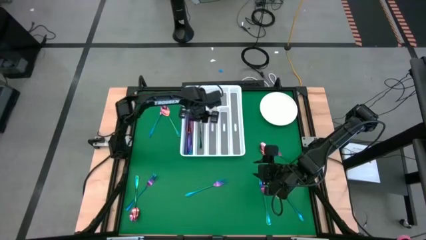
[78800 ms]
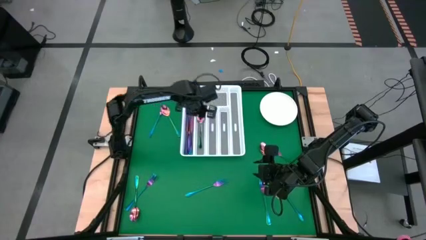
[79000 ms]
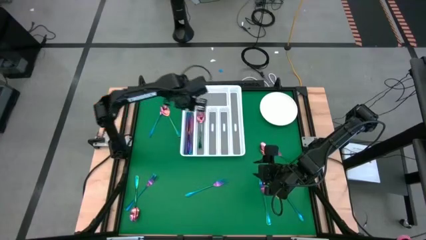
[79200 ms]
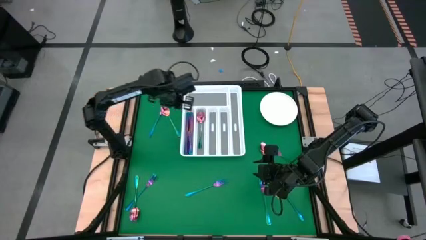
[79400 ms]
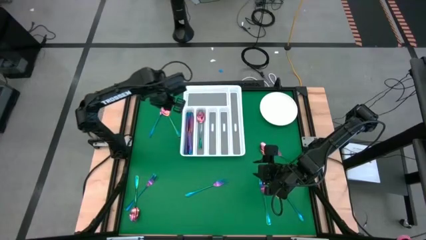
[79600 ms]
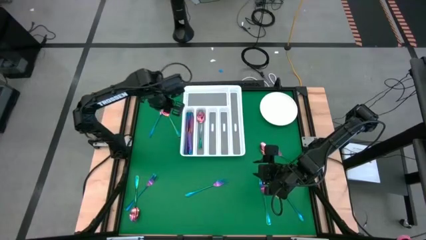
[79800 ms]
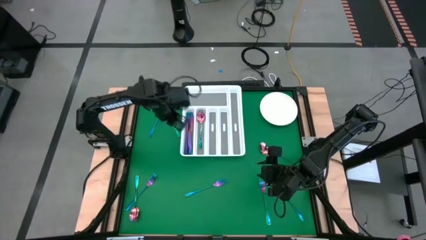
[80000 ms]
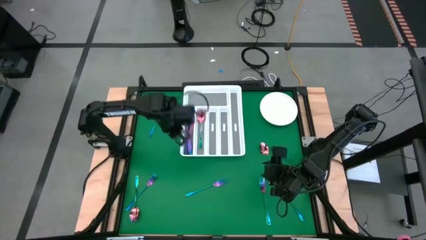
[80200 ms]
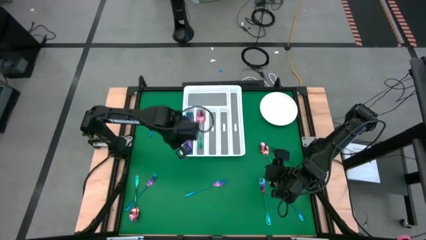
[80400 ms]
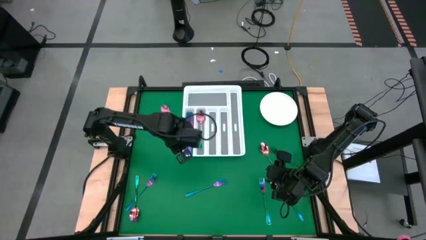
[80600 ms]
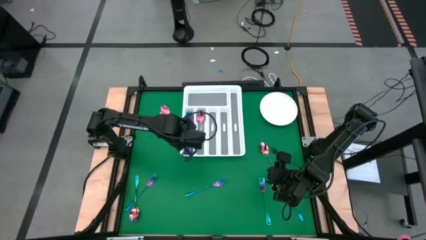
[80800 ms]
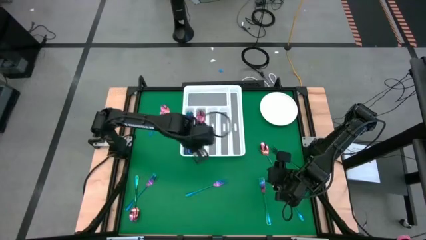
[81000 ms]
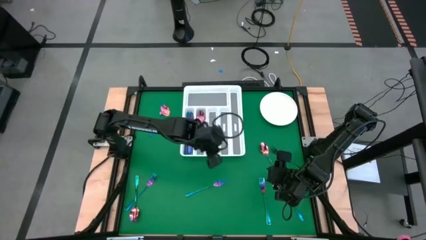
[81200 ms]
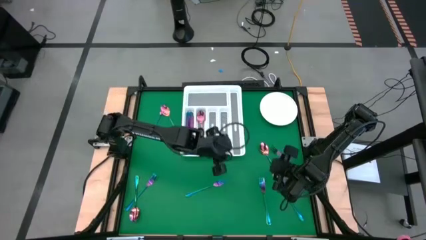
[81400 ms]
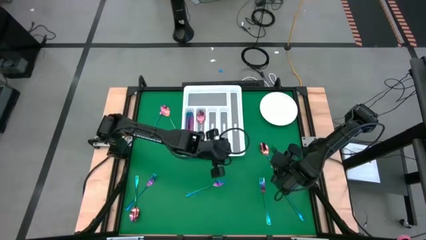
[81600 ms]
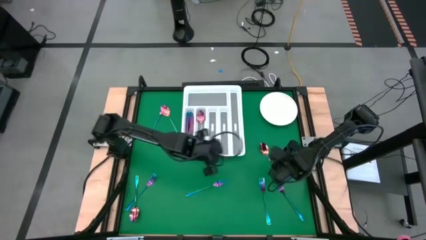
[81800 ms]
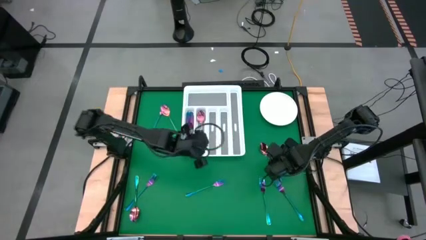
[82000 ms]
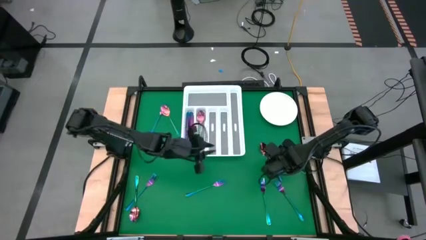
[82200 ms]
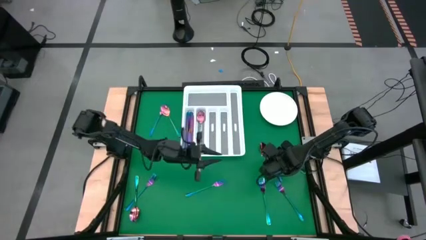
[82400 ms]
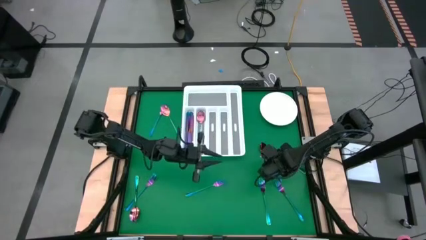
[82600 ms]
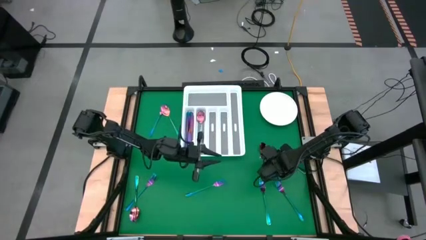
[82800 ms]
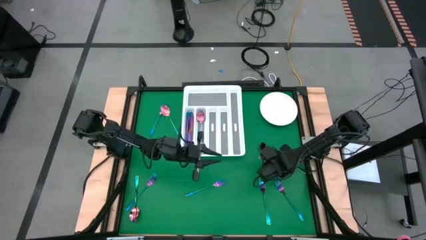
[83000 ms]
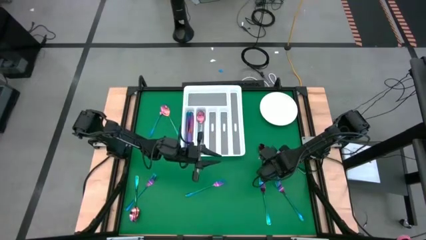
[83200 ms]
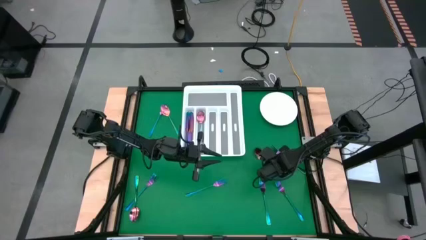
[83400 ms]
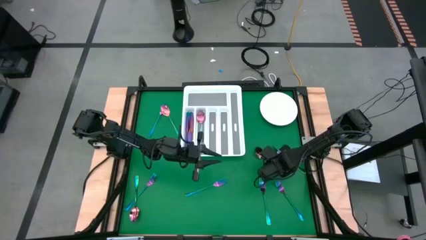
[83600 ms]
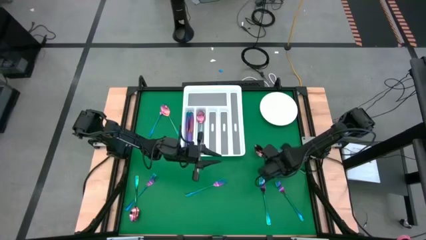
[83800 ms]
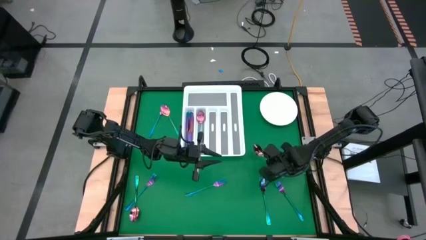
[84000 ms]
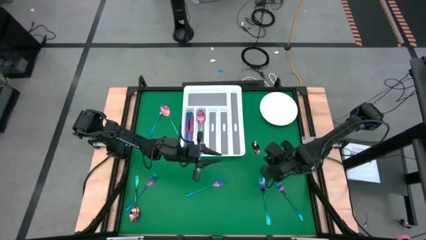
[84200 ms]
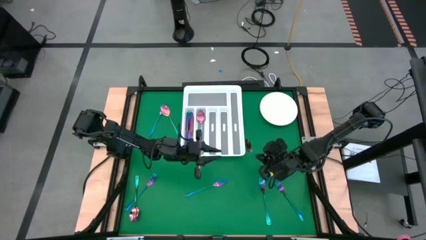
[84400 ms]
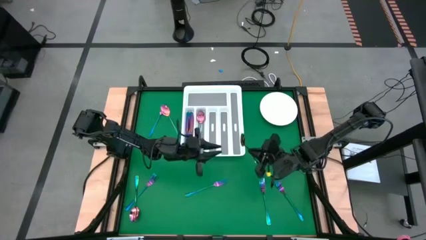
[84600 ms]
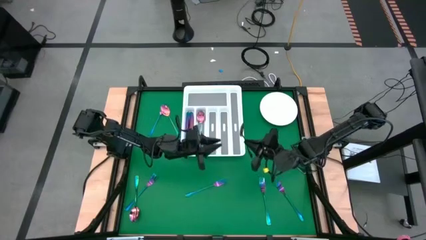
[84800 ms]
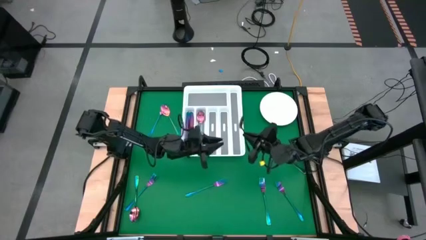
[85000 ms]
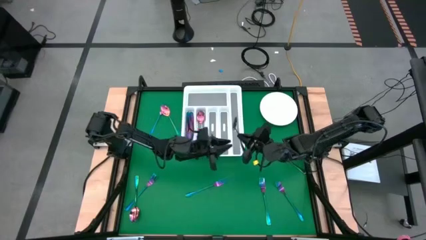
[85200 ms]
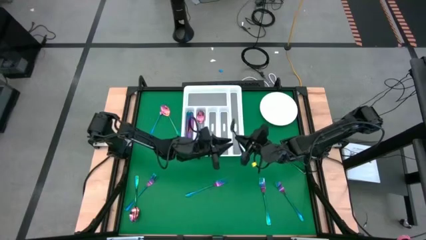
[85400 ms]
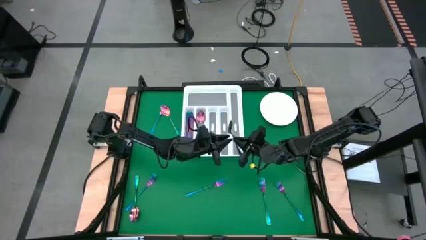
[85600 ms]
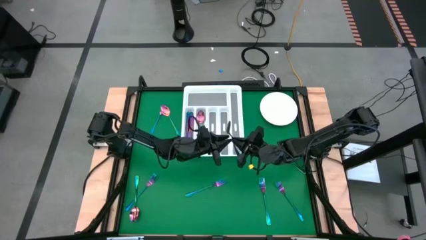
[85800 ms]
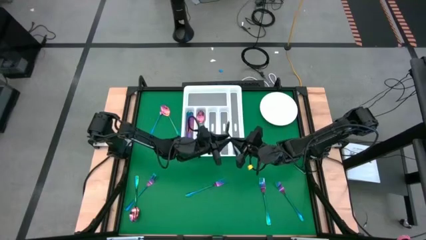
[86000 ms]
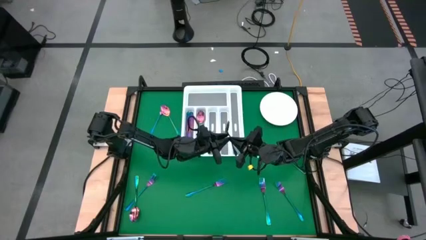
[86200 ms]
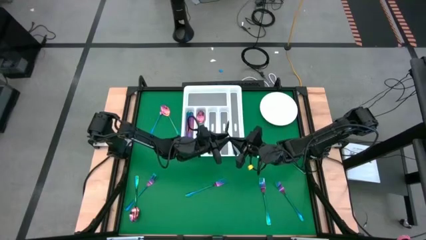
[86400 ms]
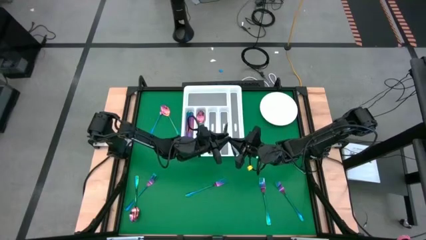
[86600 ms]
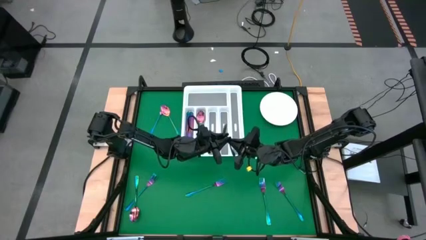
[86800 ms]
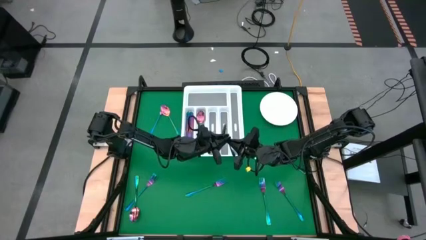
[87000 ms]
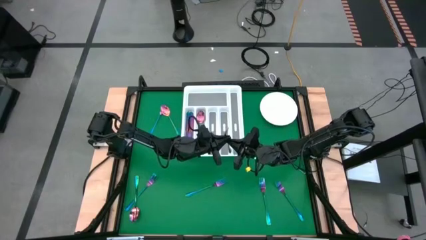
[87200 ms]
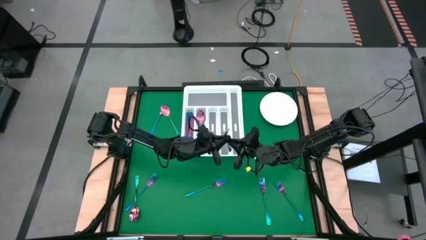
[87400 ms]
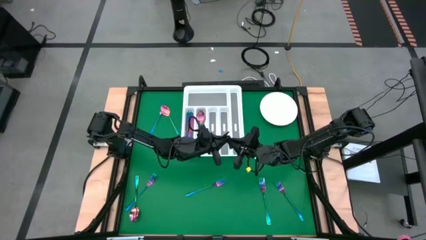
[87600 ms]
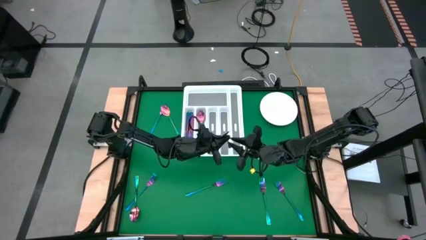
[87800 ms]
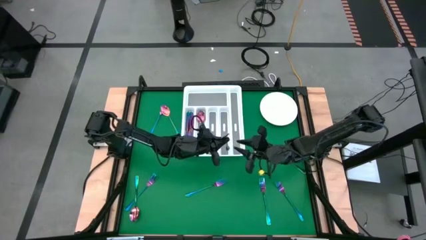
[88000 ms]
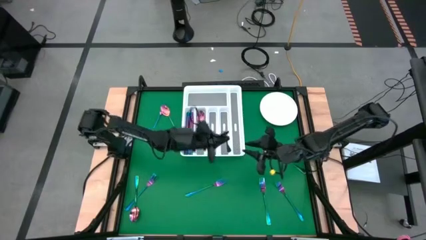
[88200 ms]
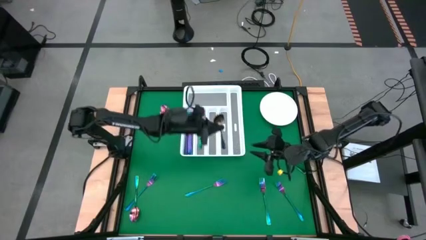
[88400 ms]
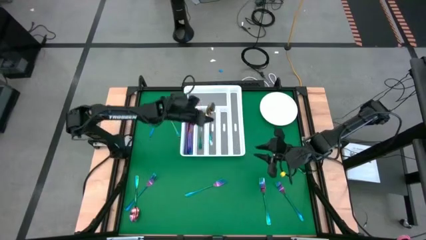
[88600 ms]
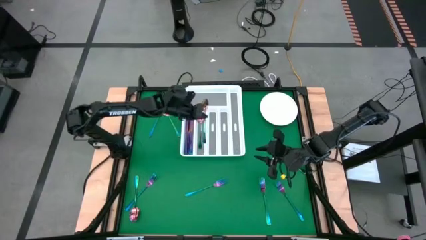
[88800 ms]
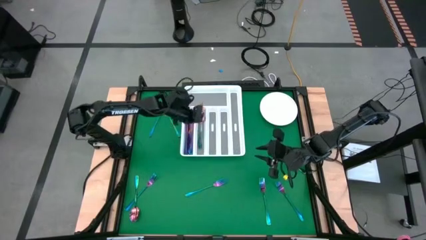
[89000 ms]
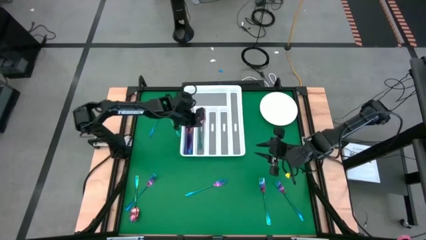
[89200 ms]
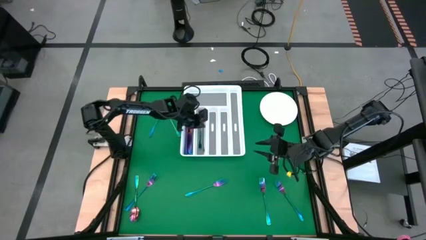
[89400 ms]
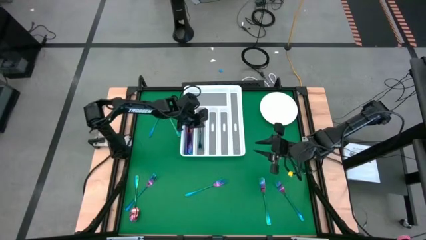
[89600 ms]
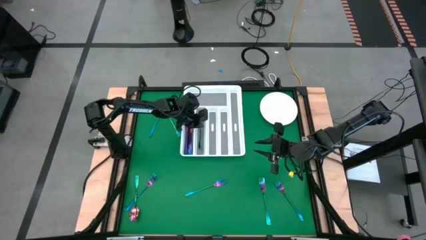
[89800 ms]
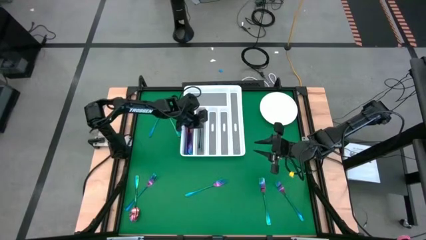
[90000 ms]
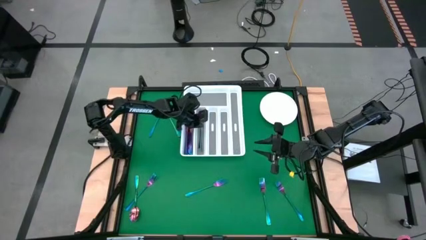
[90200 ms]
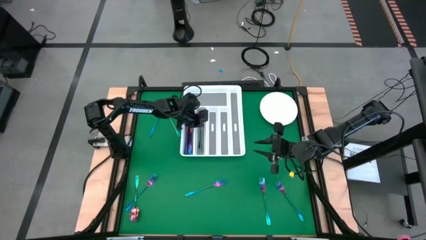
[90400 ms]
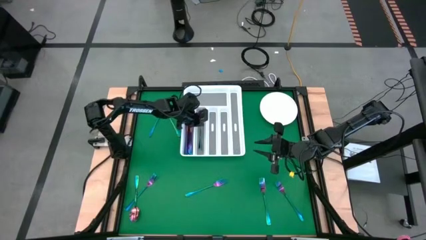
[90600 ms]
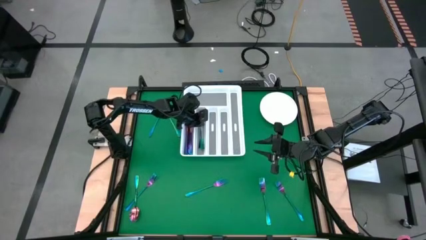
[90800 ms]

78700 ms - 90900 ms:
Task: Sort silverware
Put the blue spoon into the silverware tray

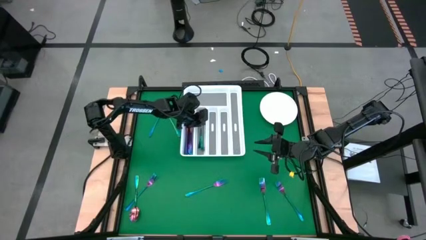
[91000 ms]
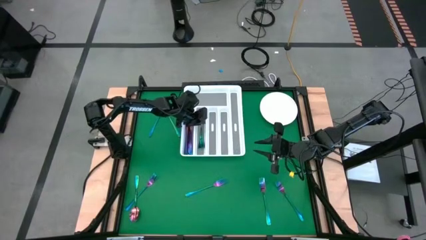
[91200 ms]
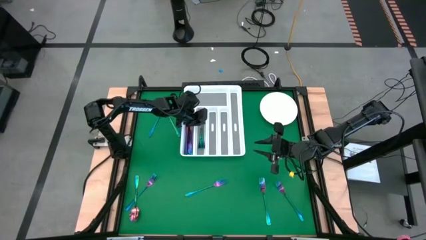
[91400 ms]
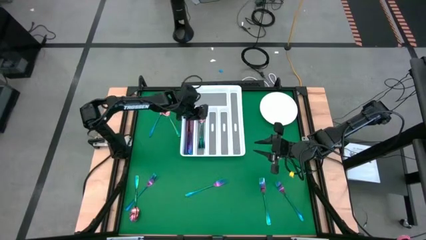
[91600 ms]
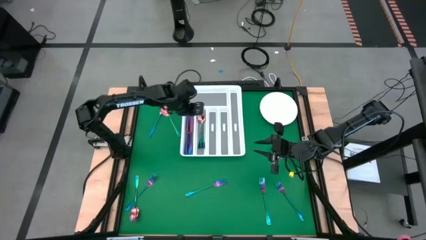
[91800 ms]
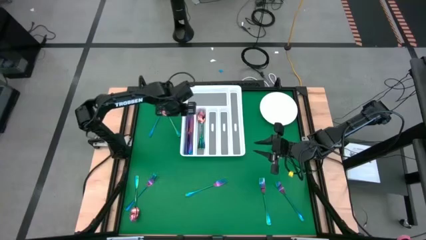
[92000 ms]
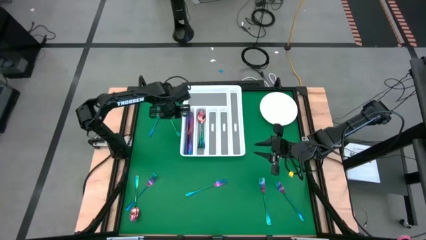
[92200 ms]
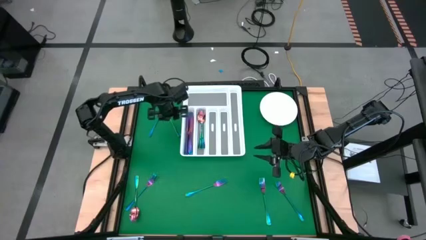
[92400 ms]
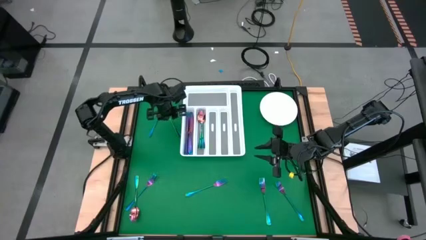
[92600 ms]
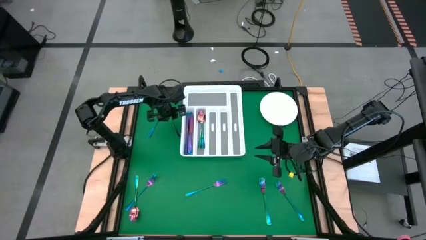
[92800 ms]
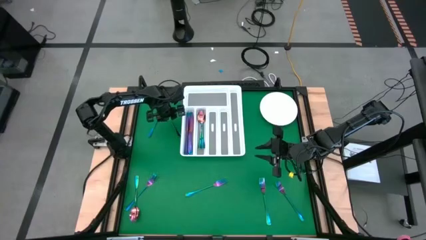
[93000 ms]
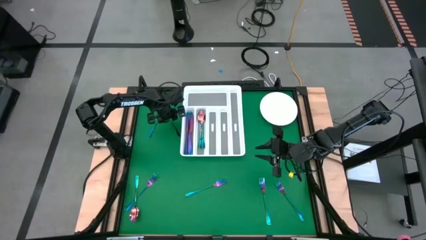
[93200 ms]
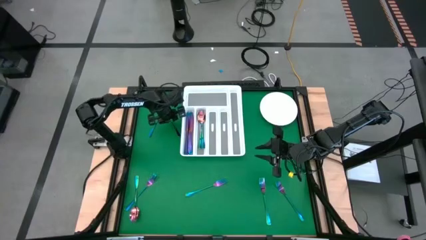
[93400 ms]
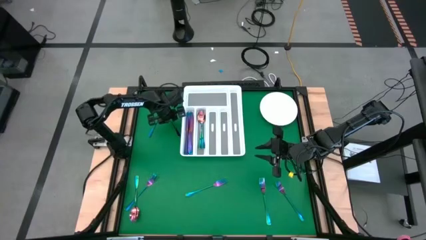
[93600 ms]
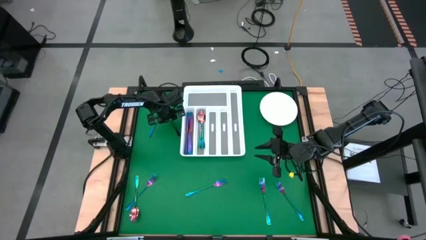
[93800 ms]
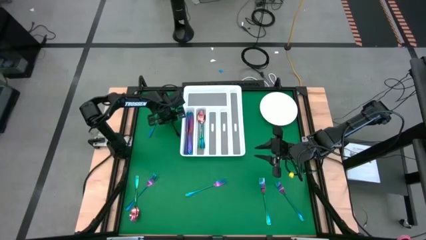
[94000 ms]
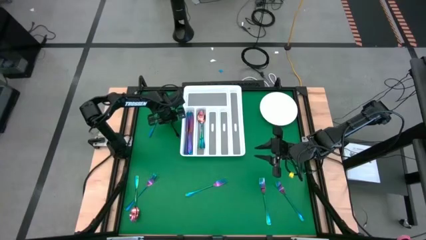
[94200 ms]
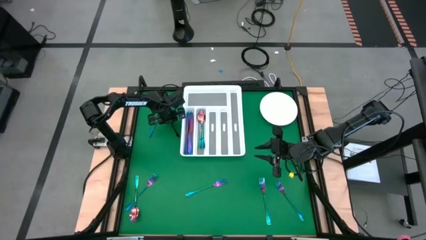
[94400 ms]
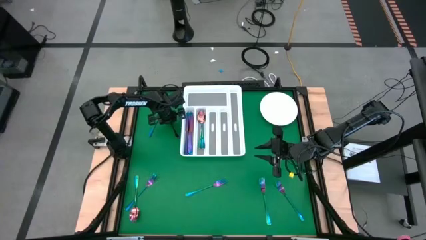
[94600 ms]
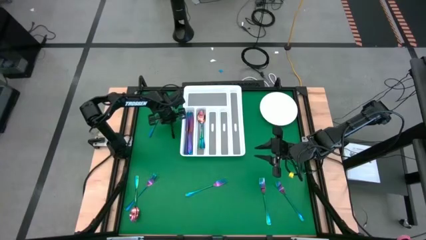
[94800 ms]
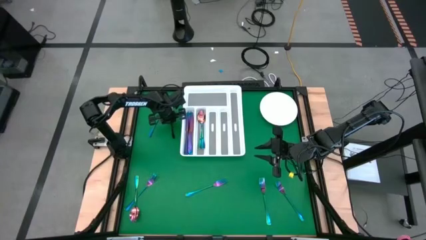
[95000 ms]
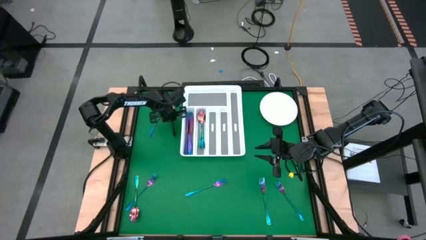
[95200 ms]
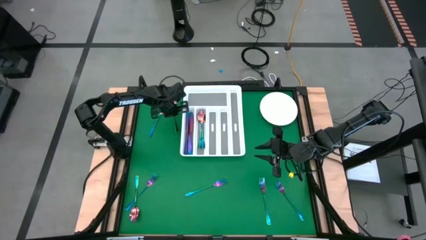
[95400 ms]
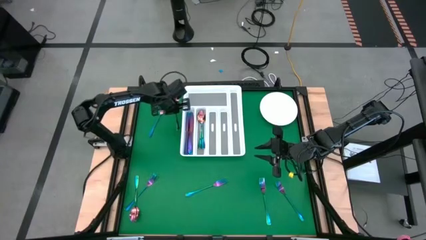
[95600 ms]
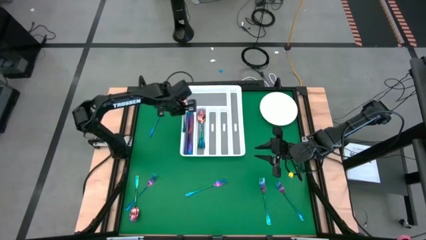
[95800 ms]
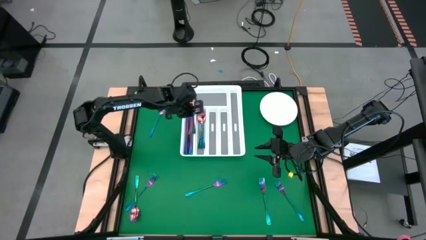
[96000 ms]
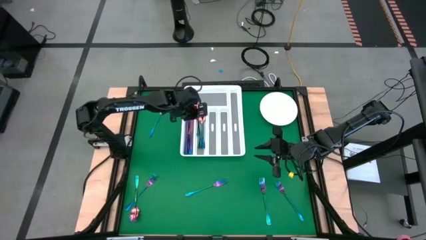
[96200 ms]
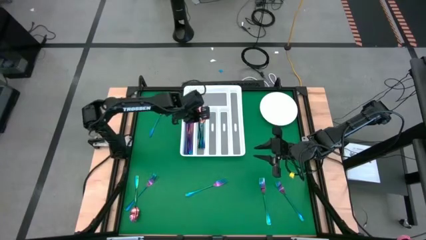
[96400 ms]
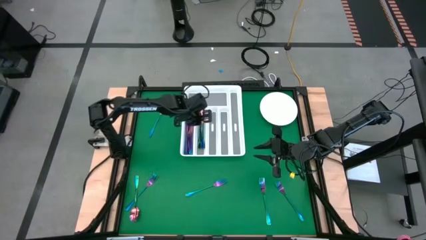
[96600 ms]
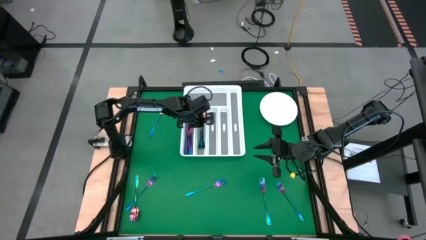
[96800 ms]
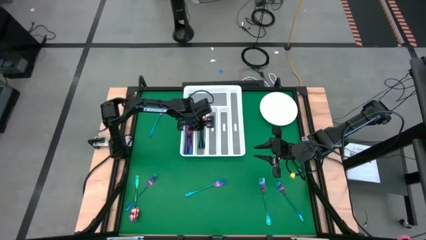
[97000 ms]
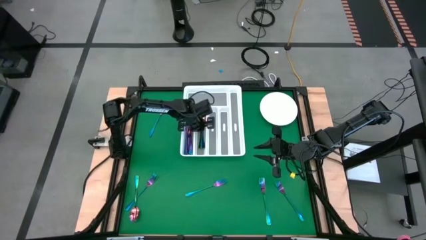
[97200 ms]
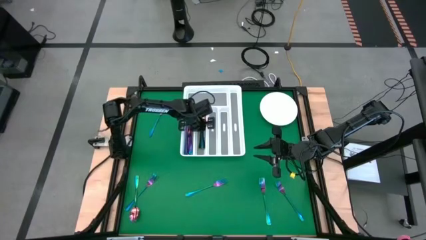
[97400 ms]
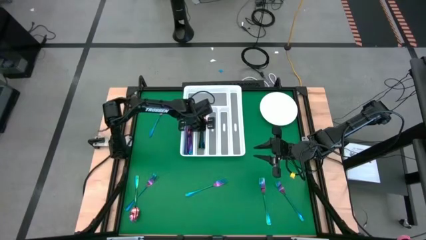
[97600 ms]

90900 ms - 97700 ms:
Put the blue spoon into the silverware tray
